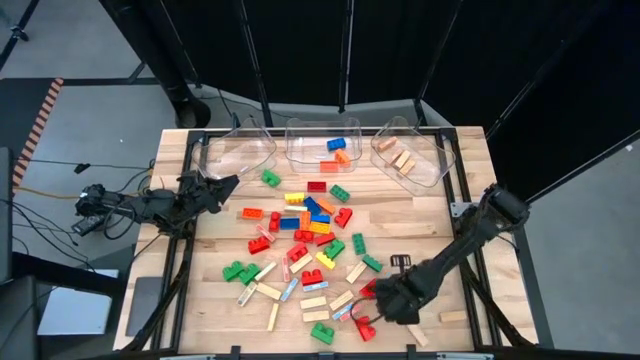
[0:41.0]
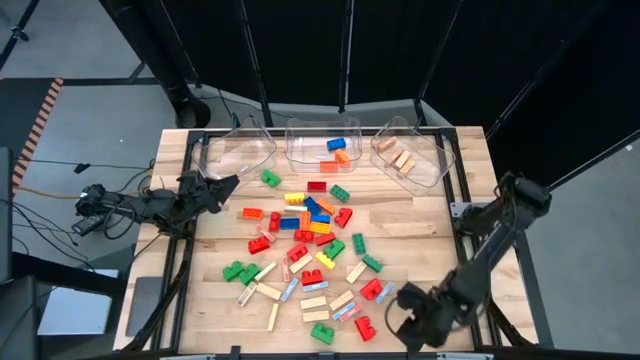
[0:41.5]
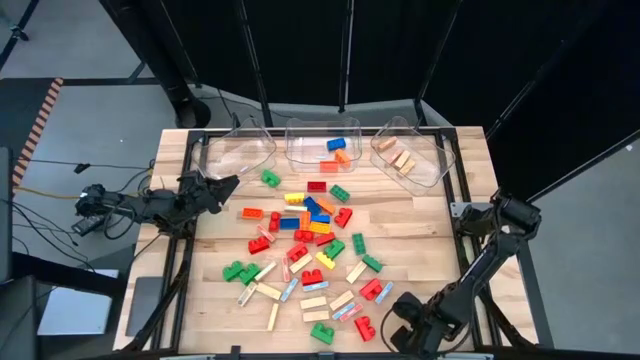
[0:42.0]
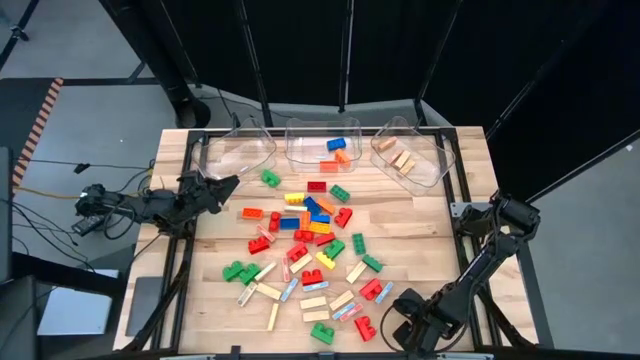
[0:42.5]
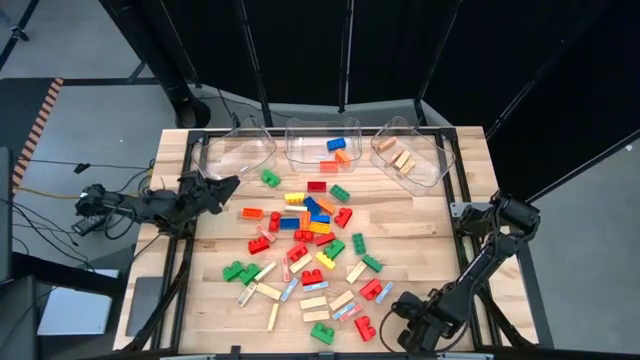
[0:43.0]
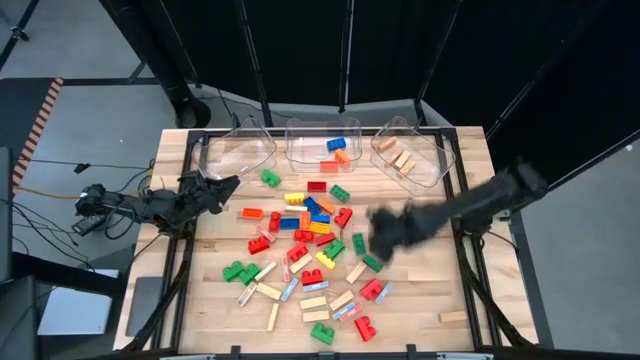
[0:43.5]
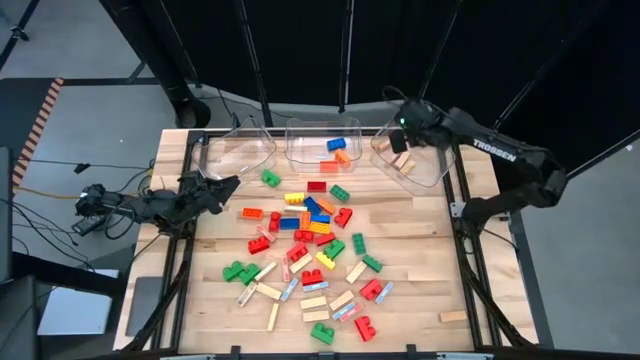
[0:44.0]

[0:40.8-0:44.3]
Task: Sort blocks by size
Put the brown wooden block into the right transparent bin

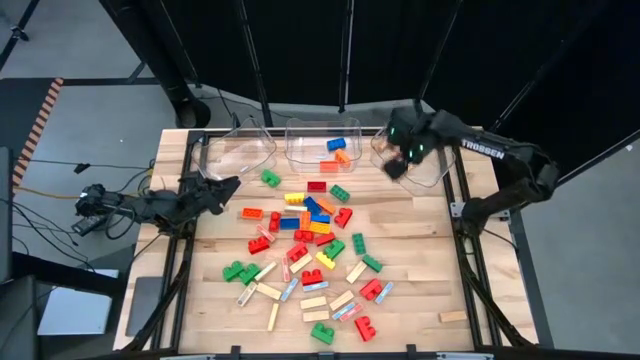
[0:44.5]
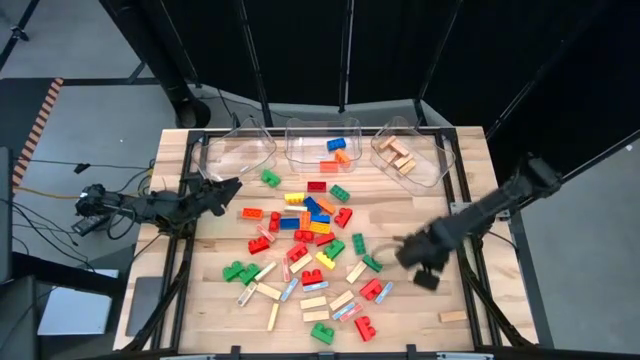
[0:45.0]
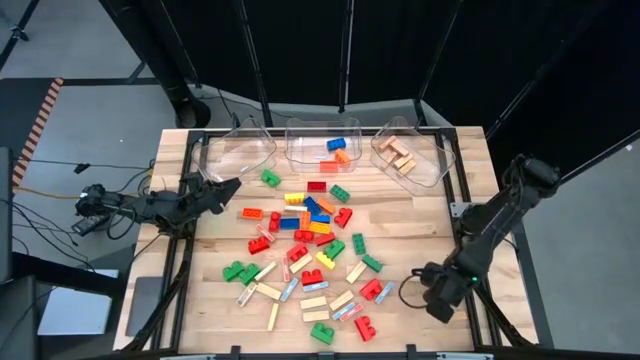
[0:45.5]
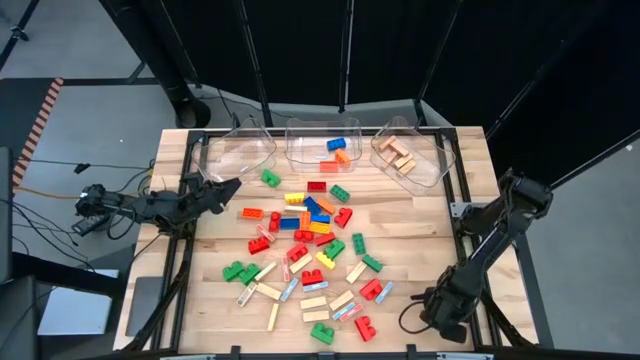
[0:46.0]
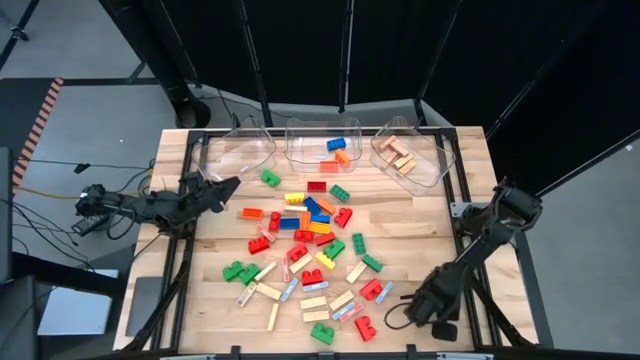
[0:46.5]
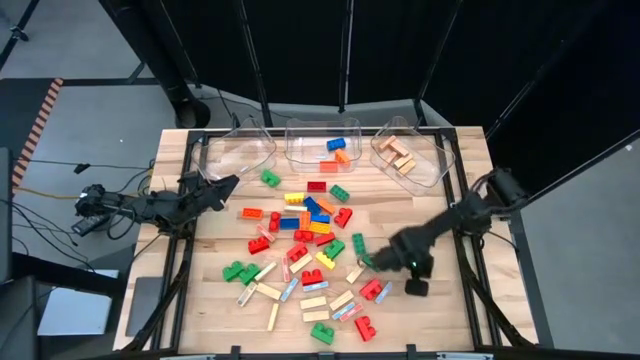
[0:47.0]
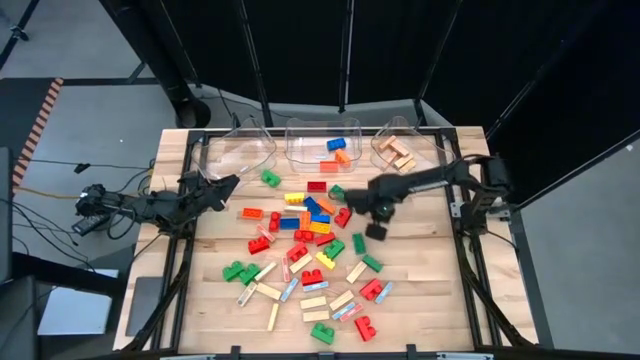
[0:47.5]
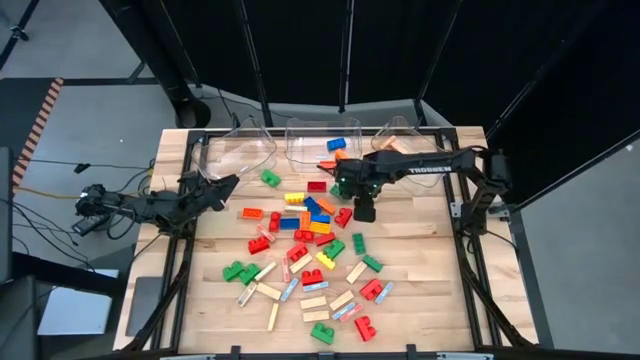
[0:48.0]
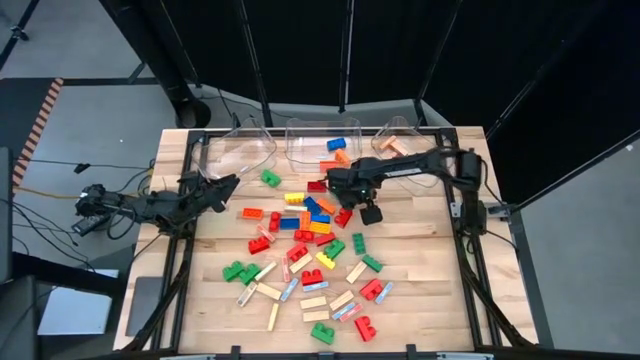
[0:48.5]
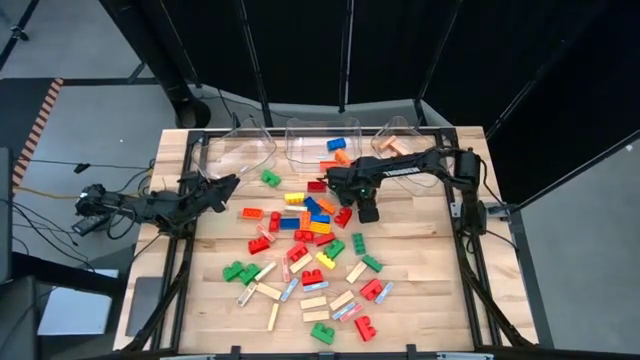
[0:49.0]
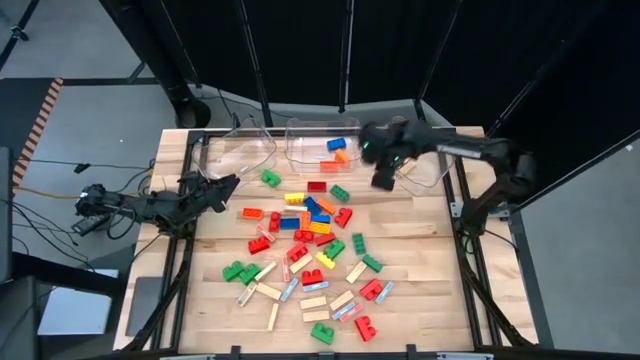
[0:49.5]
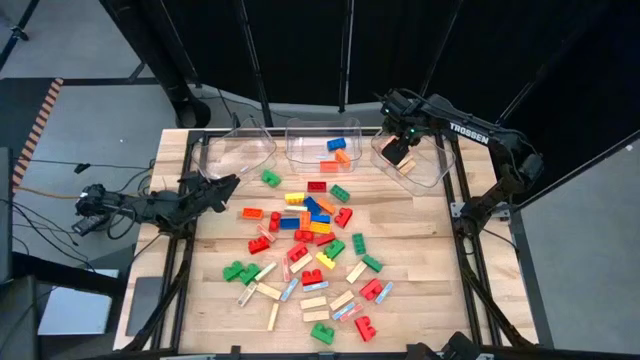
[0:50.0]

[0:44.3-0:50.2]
Put the brown wooden block into the right transparent bin

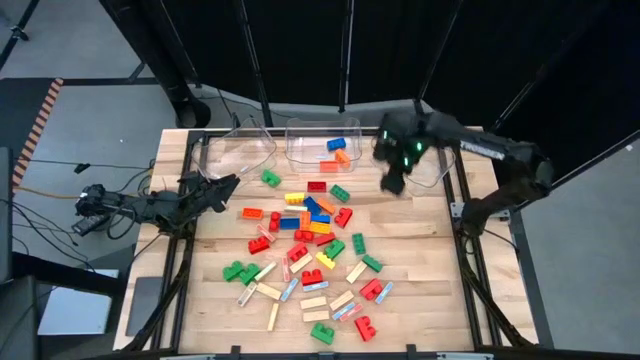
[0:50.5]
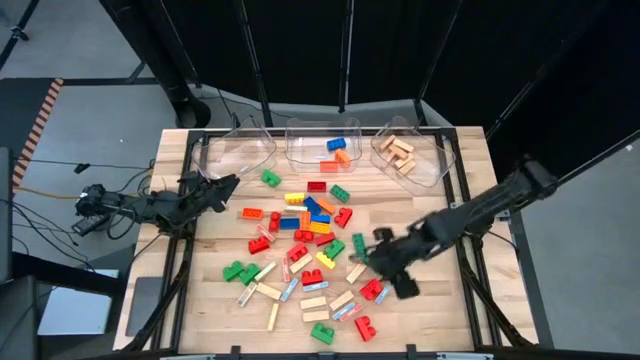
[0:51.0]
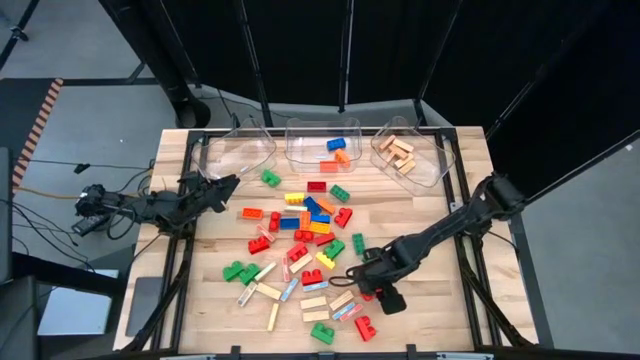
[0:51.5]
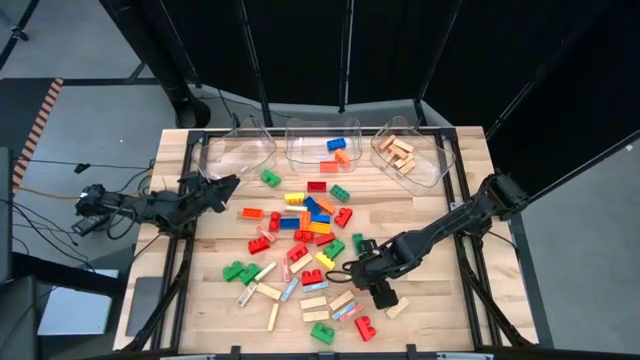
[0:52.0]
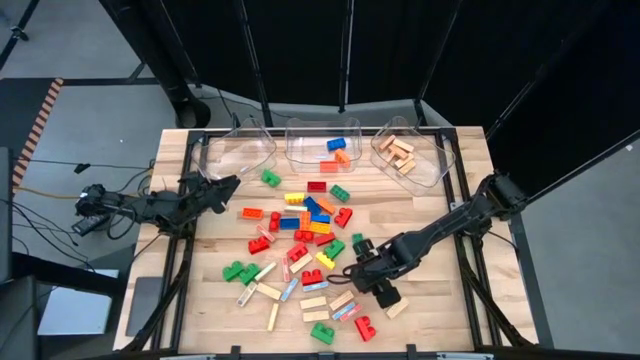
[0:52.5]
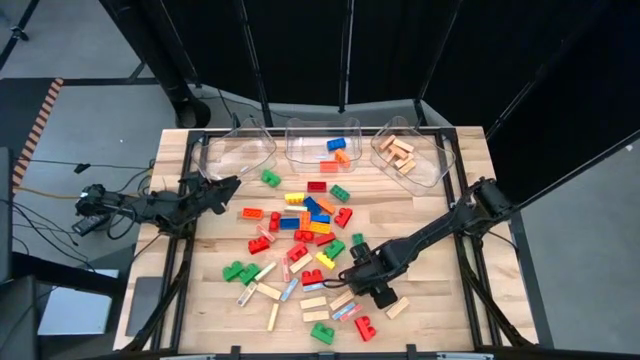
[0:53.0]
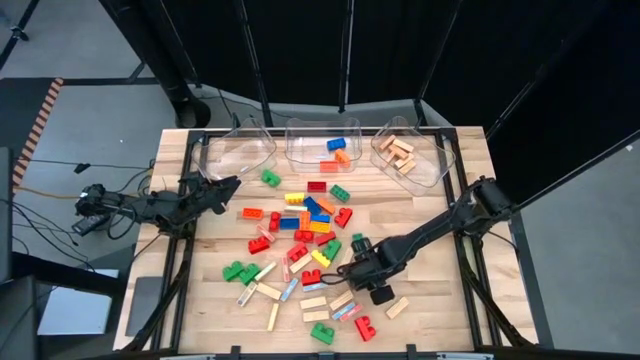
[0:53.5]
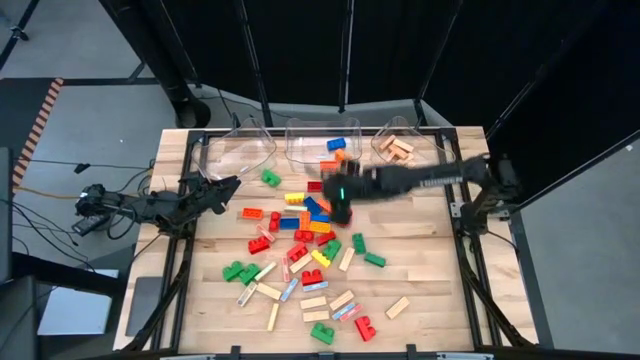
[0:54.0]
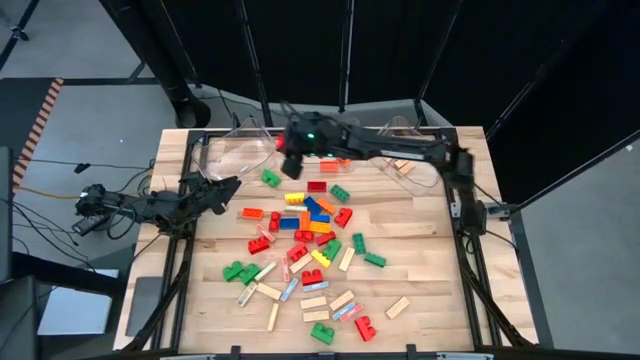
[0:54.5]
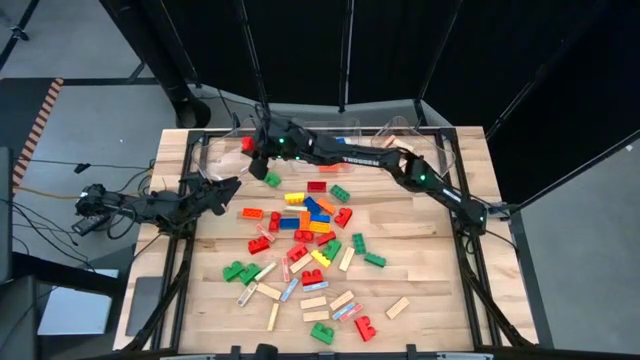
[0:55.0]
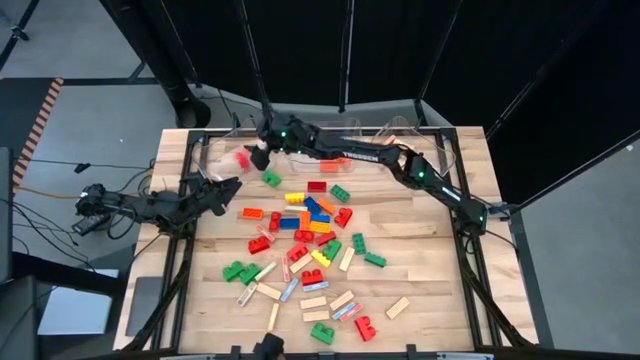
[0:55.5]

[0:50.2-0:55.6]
Put the small game piece into the left transparent bin

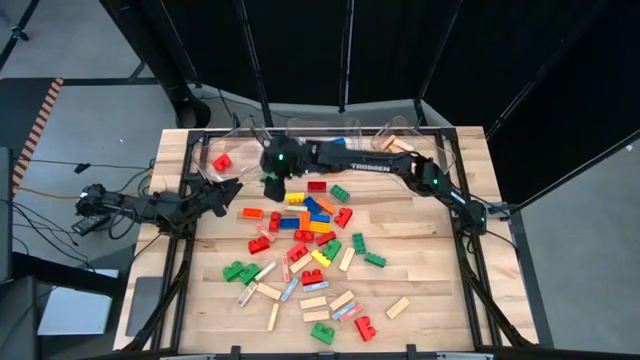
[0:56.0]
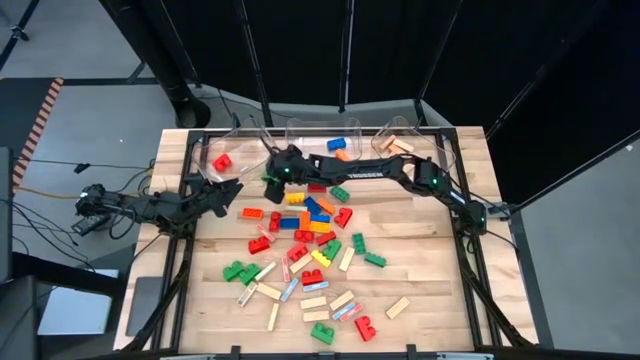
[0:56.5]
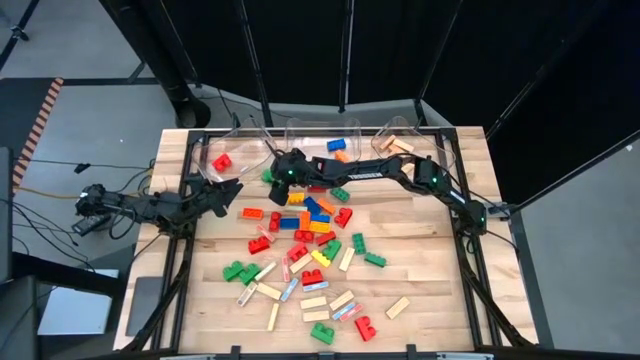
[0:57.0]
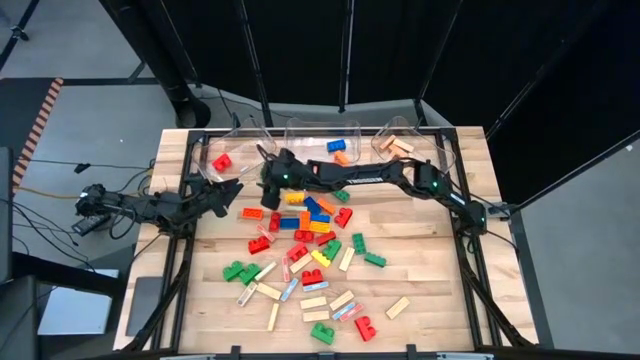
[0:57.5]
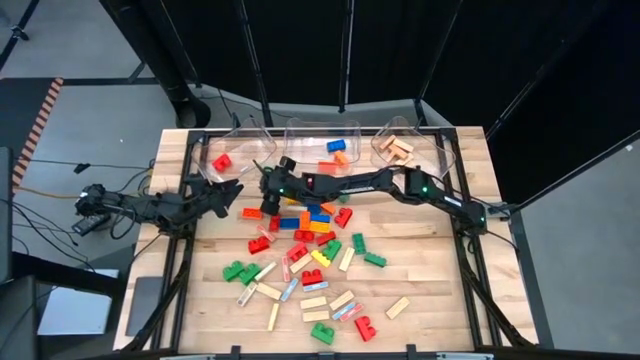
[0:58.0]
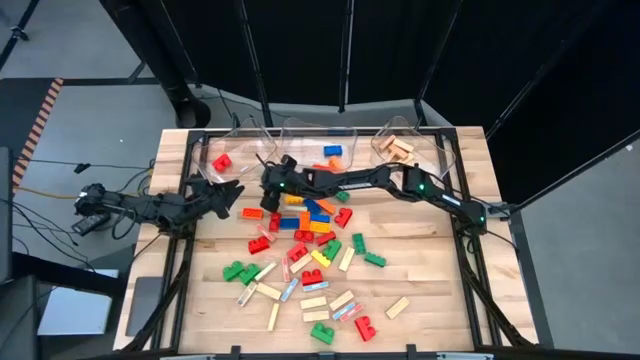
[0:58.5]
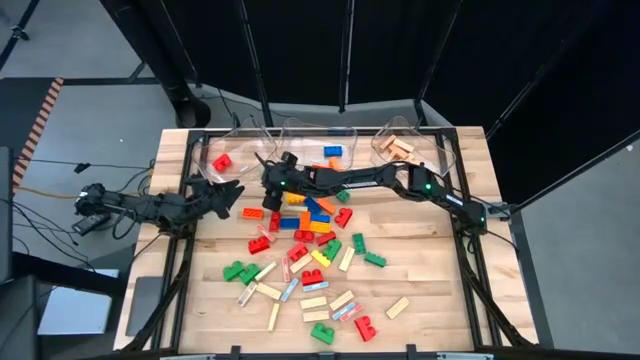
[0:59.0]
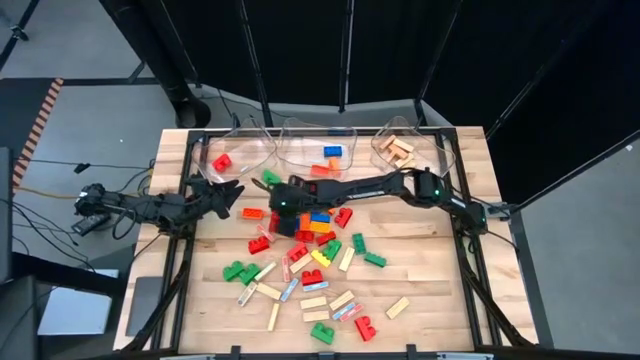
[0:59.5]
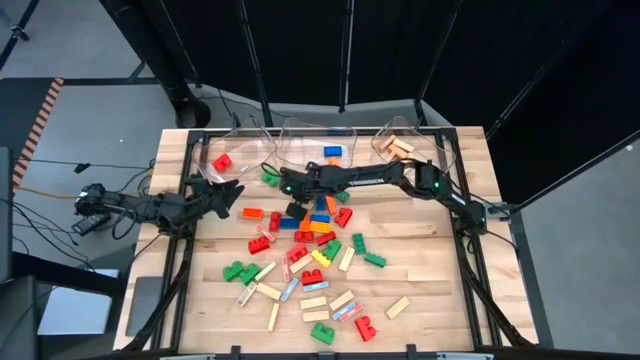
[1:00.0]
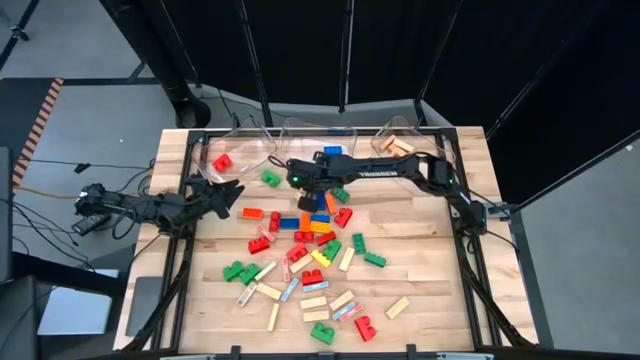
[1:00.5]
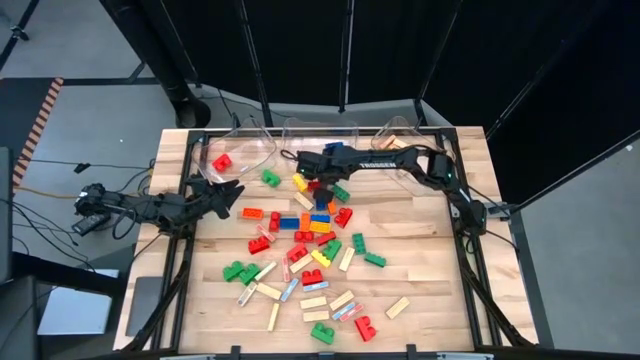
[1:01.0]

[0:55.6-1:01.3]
Adjust the middle transparent bin

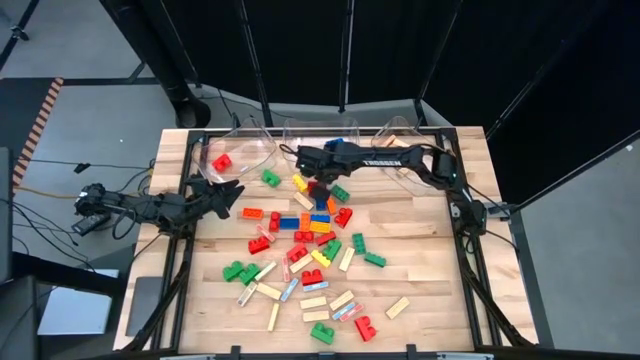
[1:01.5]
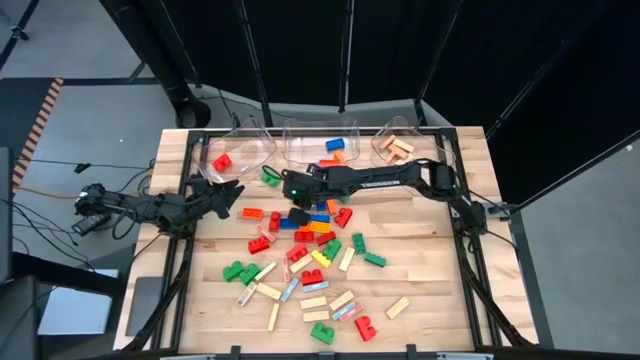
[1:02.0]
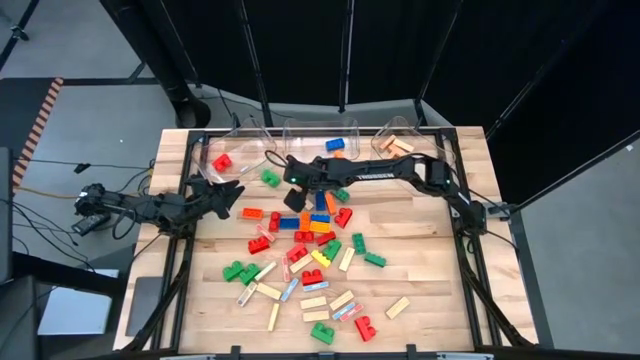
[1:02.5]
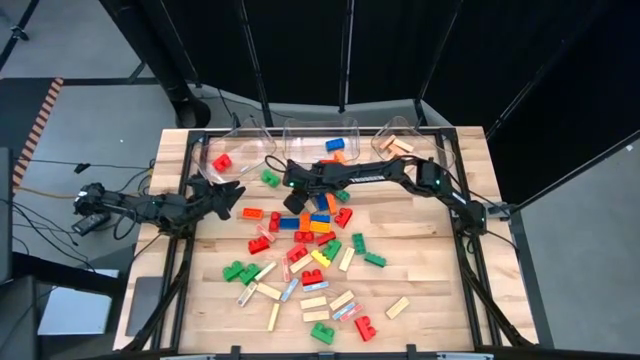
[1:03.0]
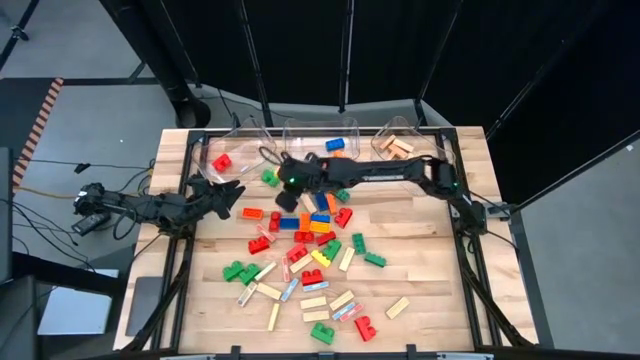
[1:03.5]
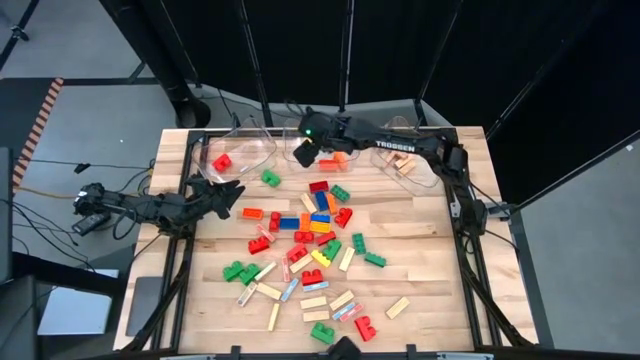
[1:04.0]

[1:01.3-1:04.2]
Put the large yellow game piece into the middle transparent bin
